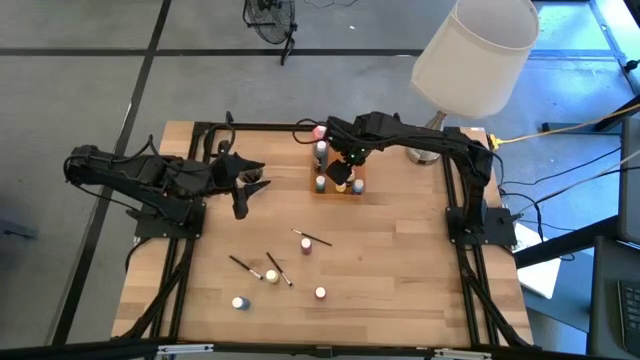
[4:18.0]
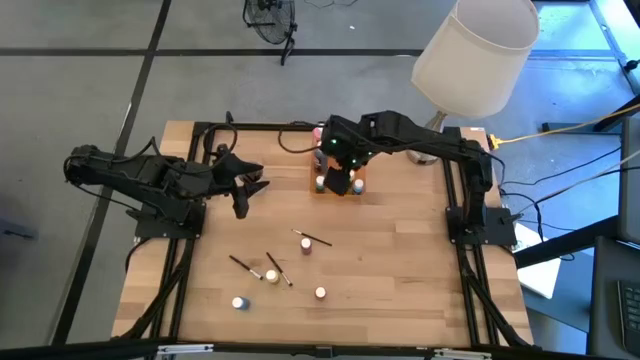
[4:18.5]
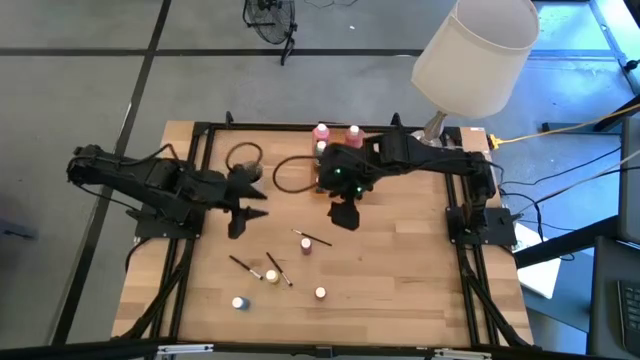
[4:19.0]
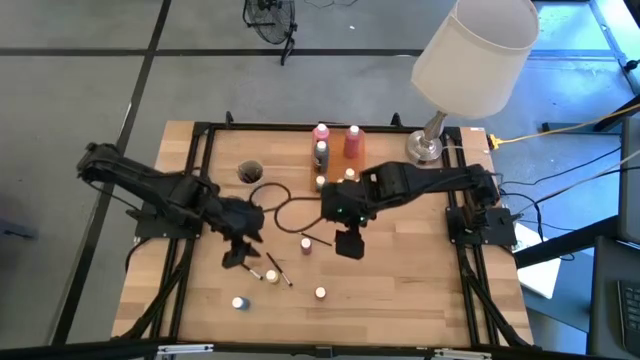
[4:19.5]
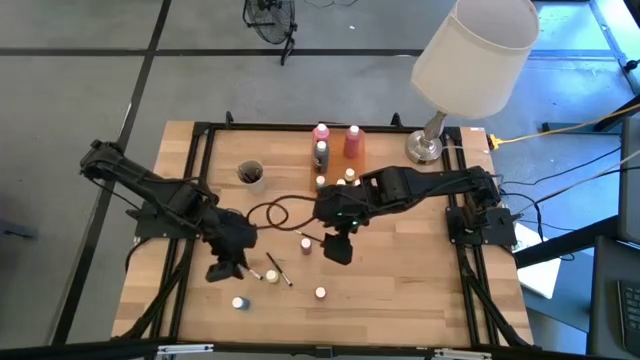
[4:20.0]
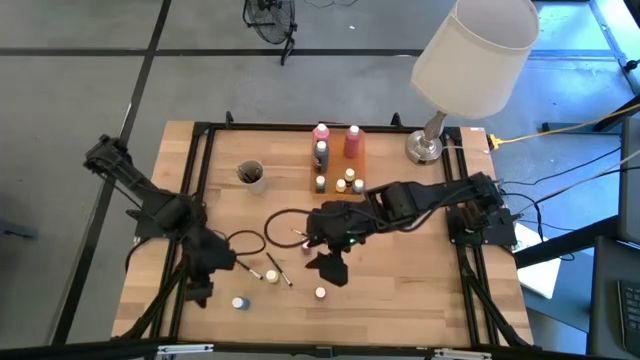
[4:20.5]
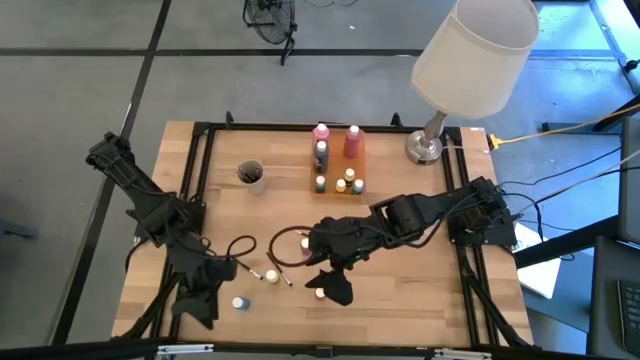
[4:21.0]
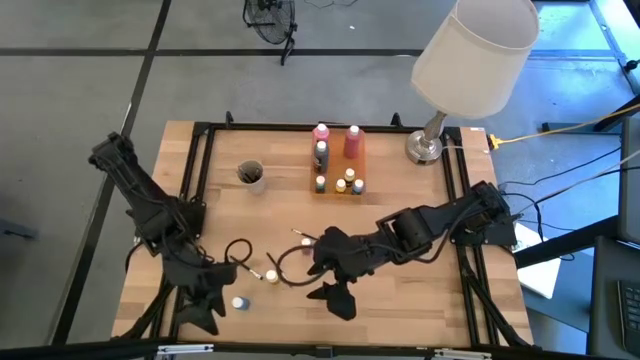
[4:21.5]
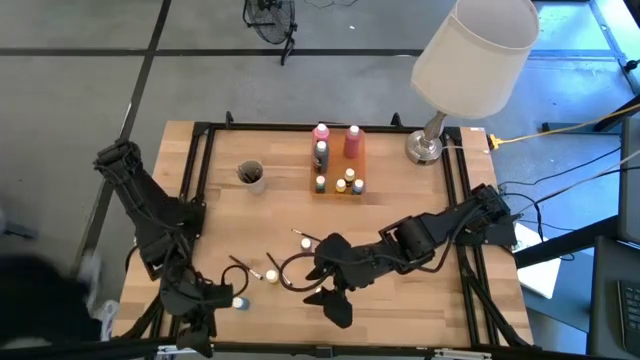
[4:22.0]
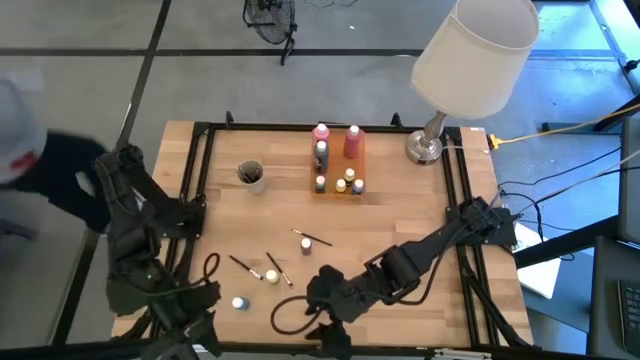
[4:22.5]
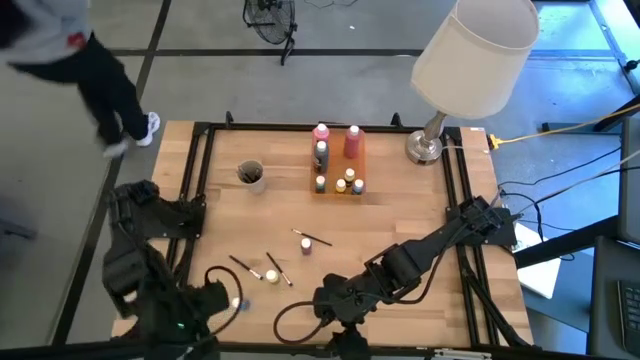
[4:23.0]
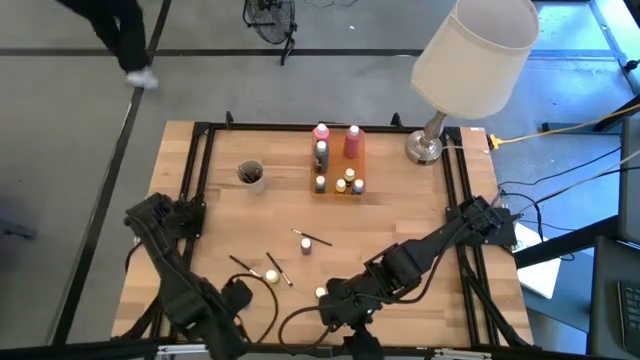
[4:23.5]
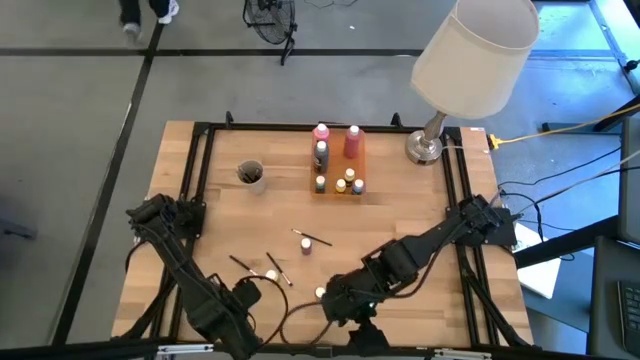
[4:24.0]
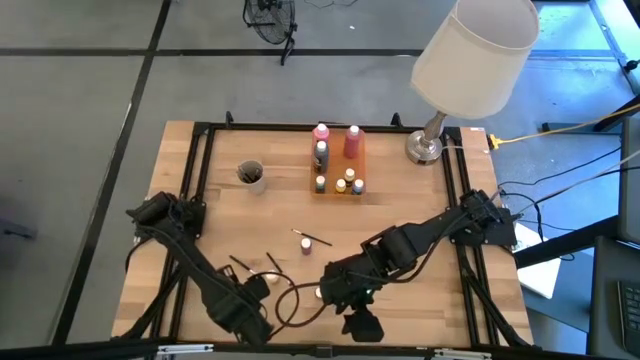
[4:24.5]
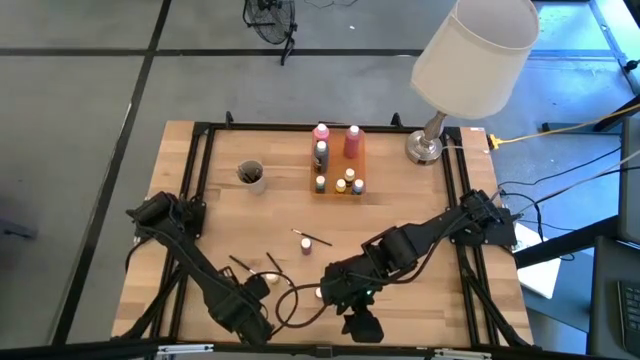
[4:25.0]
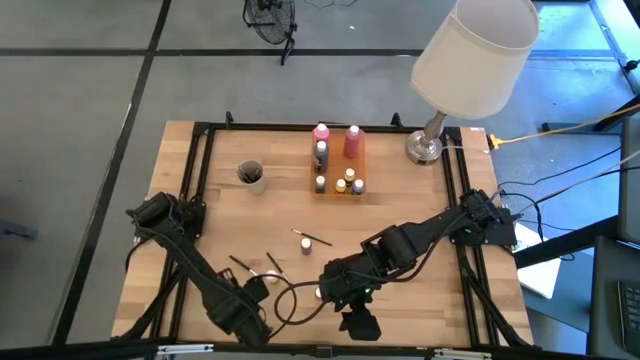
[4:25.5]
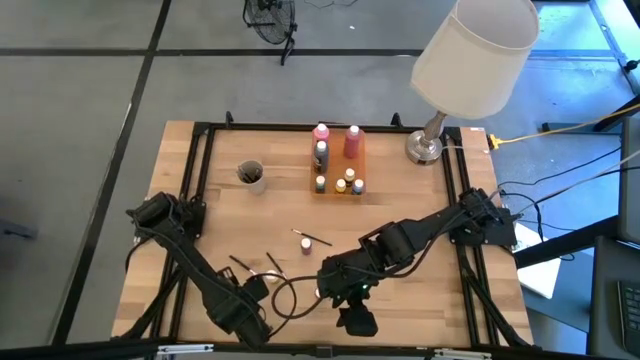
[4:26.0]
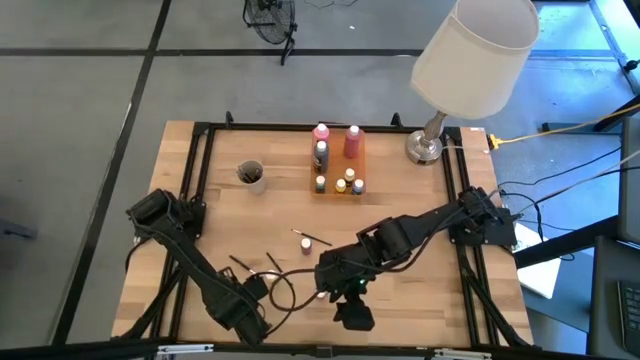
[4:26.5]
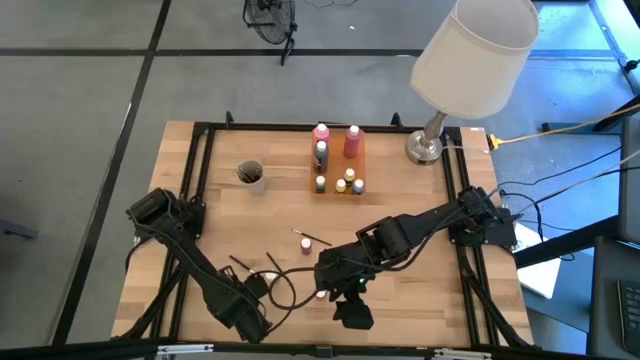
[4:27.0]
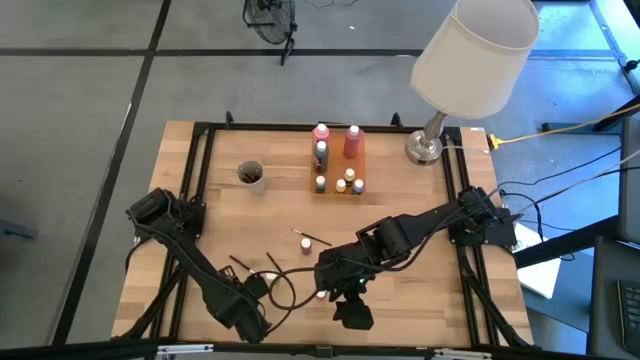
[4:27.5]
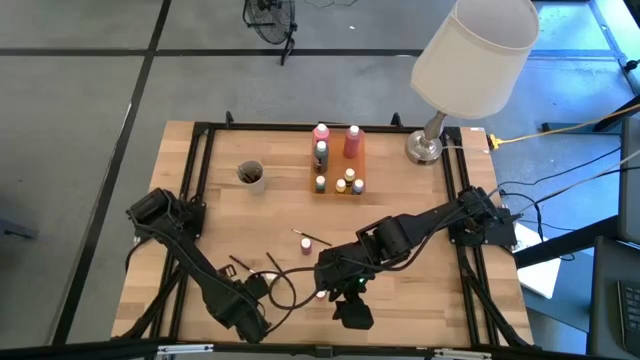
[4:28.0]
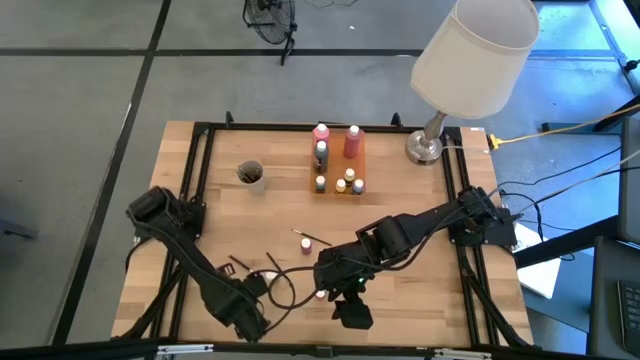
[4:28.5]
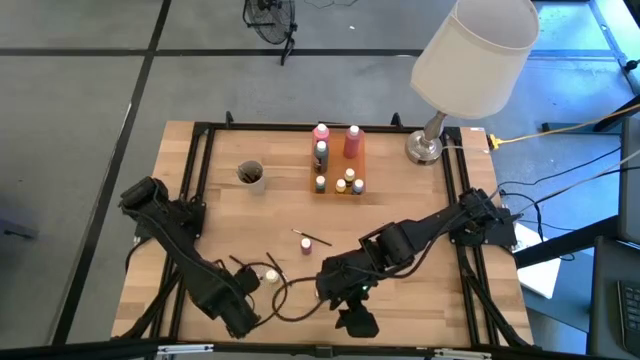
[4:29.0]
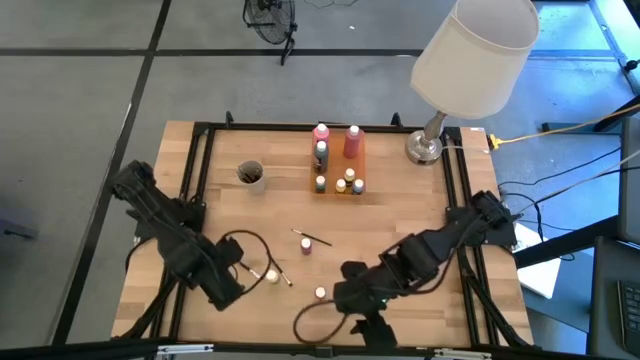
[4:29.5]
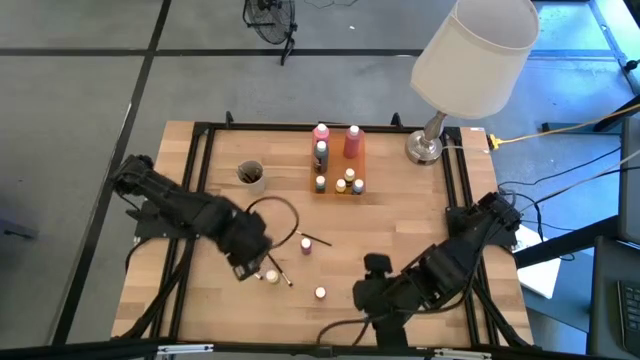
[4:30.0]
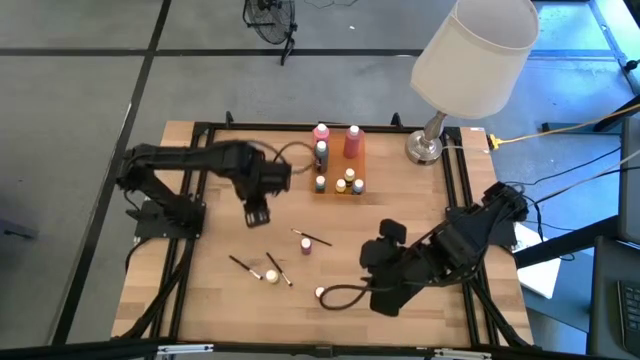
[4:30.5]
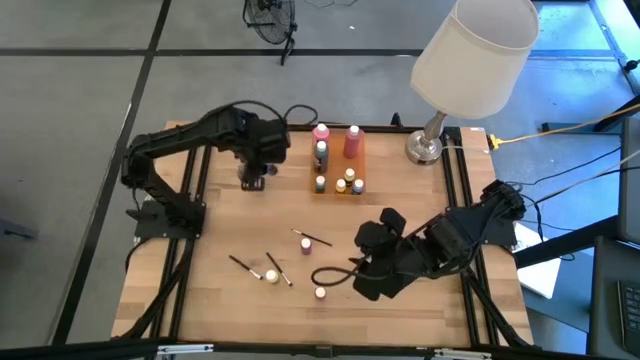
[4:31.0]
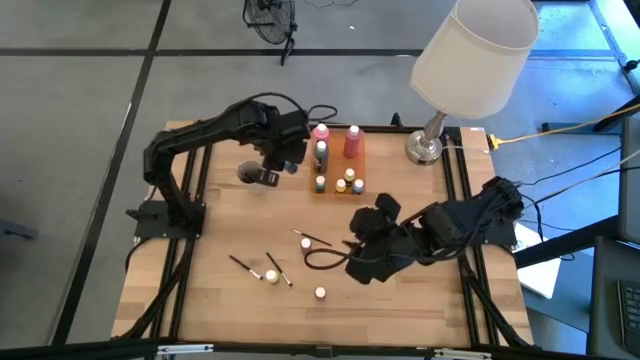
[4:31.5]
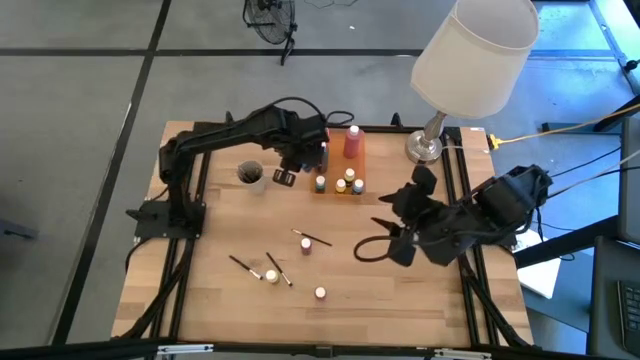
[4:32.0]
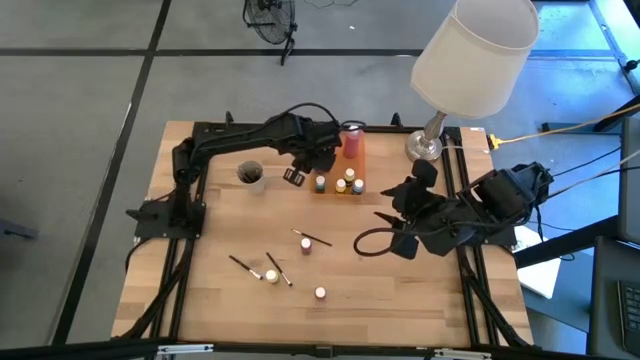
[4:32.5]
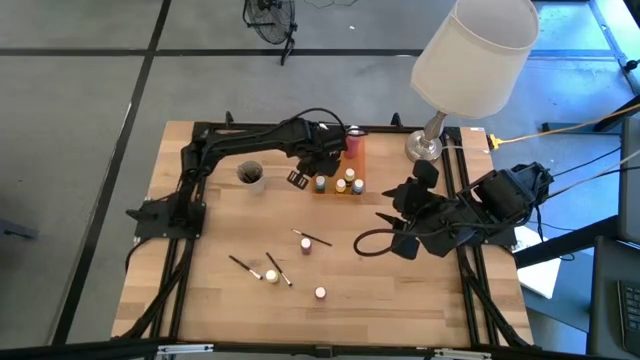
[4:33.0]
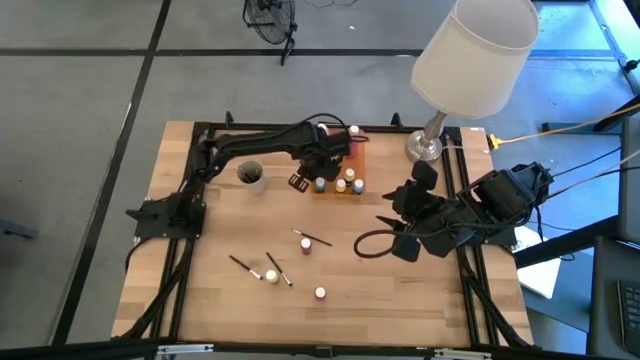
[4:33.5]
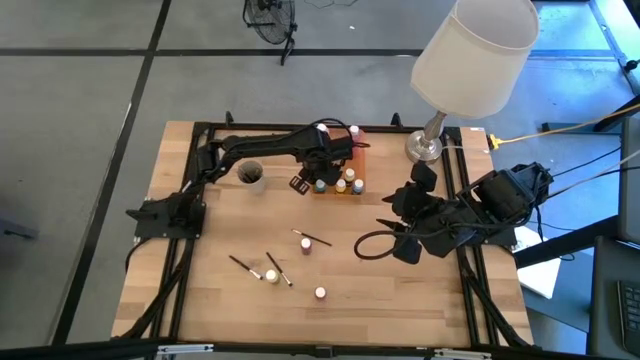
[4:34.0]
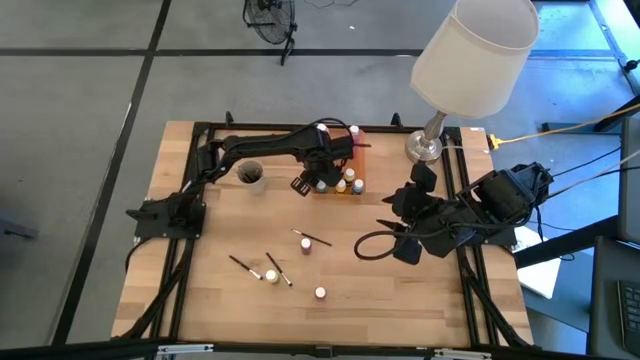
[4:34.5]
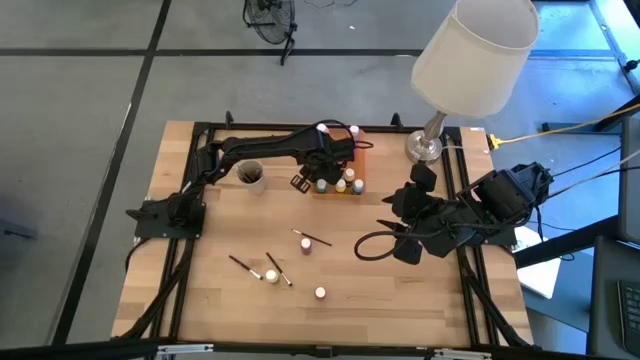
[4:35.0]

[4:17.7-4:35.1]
Task: Pick & Place Paint Supplies
Put the small blue paint bottle into the orange bin

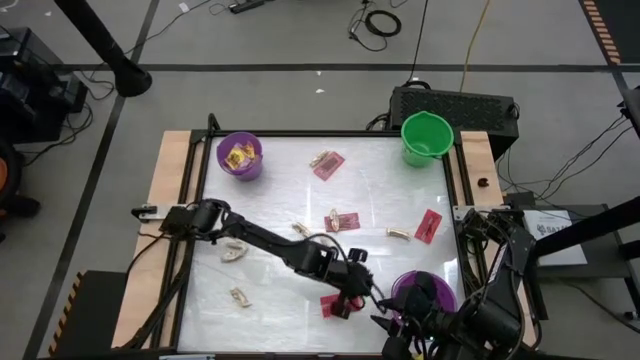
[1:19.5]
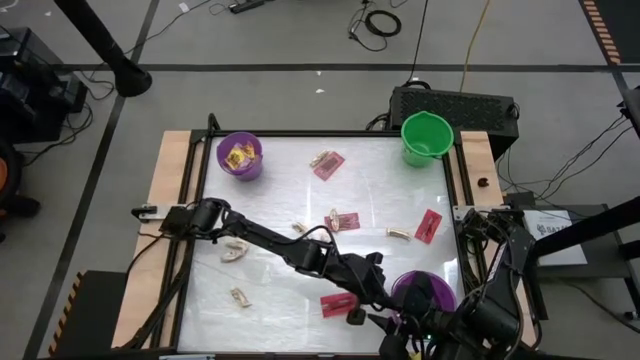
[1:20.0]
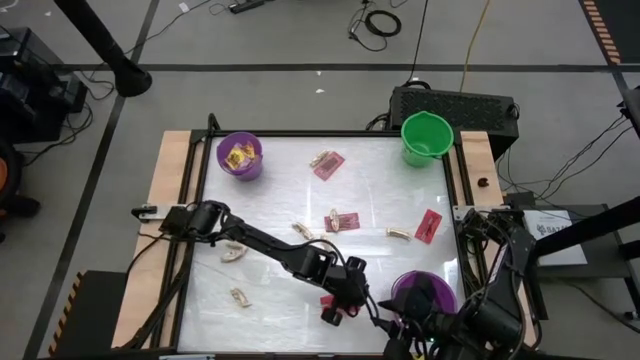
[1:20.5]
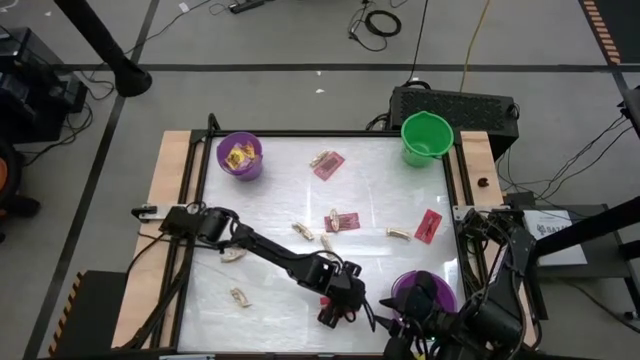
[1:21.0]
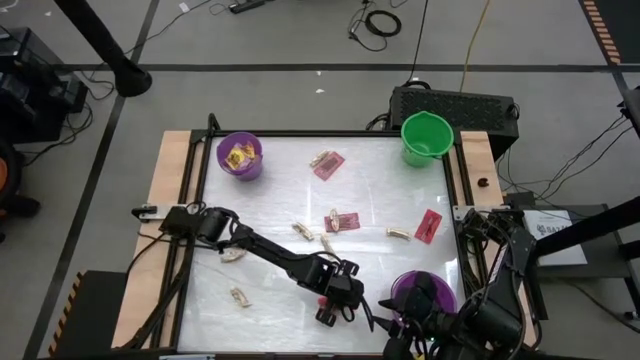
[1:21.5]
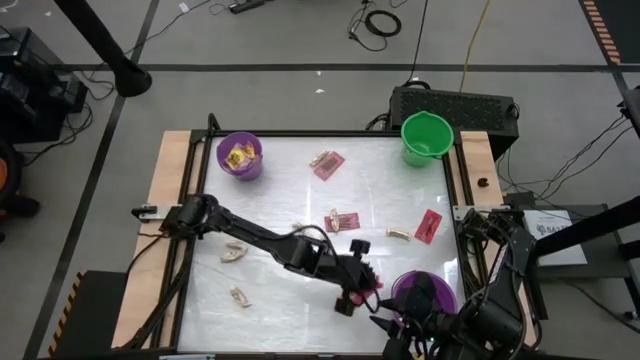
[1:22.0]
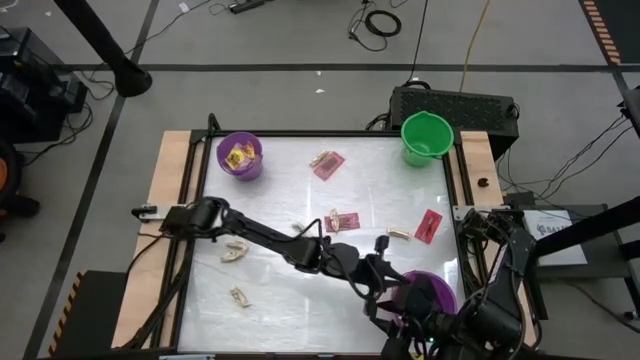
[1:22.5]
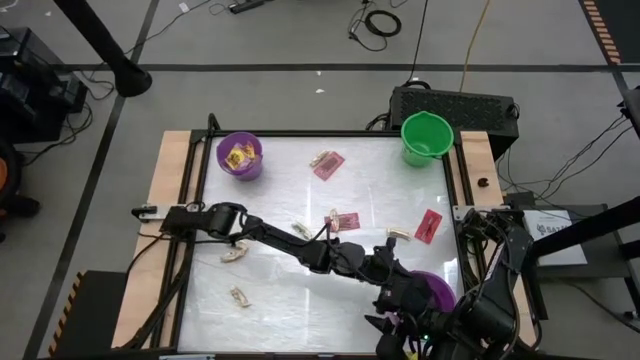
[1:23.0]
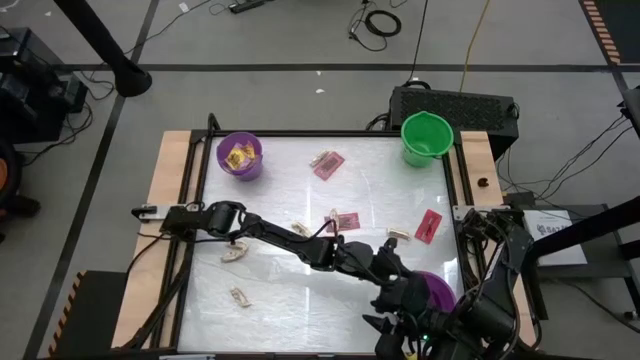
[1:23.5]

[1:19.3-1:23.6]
Task: Sort candy by brand, put in halloween buckets
Put the red candy into the bottom violet bucket
